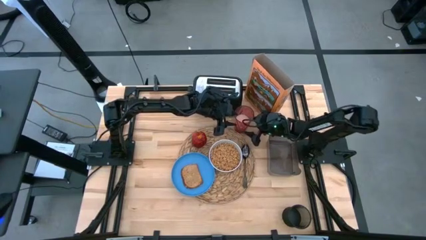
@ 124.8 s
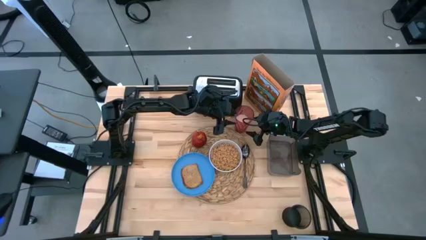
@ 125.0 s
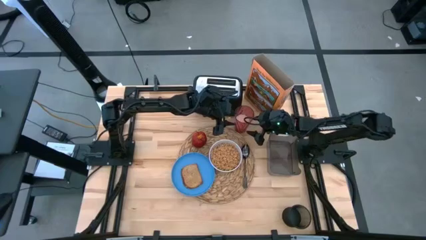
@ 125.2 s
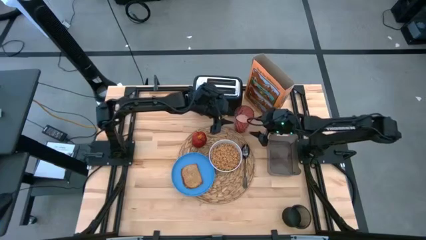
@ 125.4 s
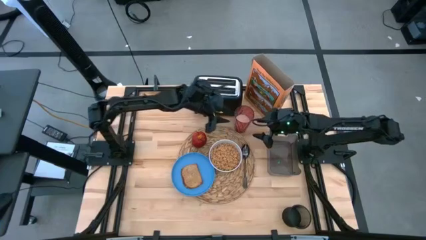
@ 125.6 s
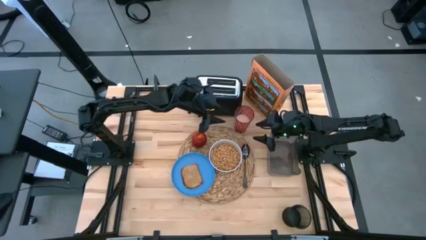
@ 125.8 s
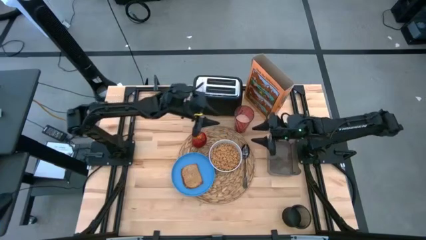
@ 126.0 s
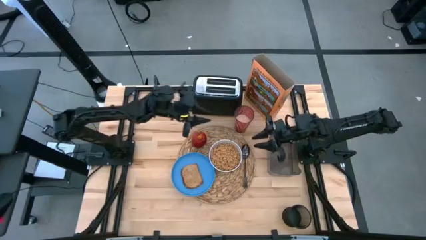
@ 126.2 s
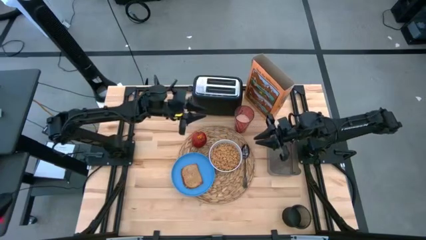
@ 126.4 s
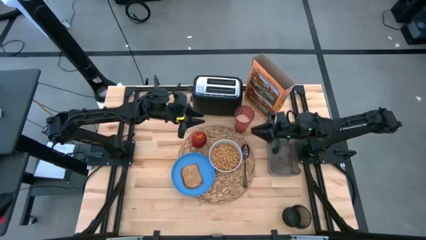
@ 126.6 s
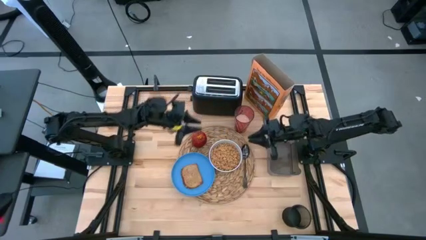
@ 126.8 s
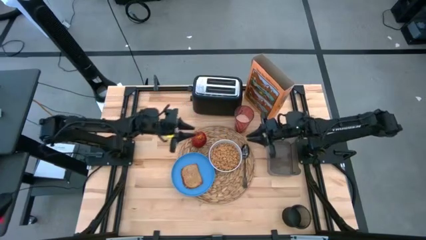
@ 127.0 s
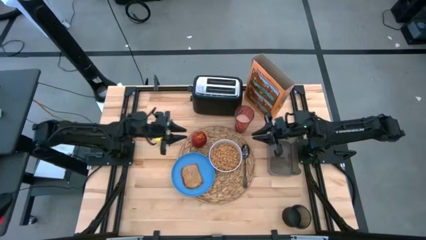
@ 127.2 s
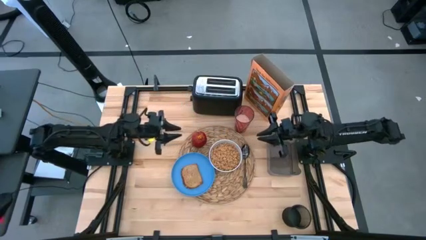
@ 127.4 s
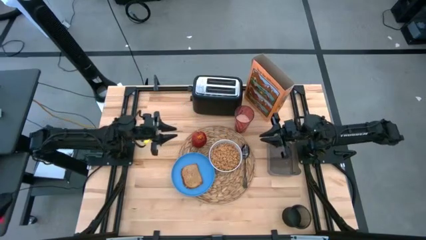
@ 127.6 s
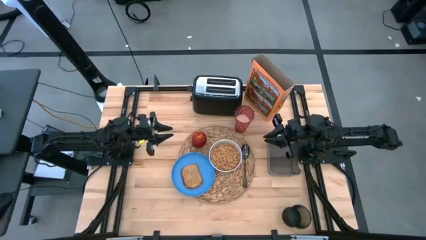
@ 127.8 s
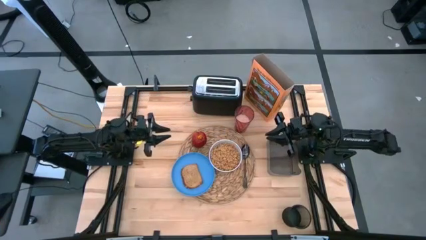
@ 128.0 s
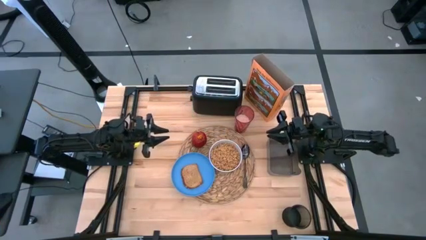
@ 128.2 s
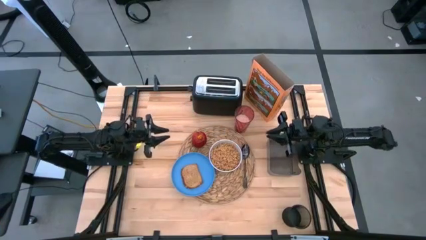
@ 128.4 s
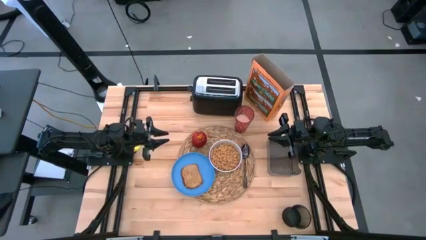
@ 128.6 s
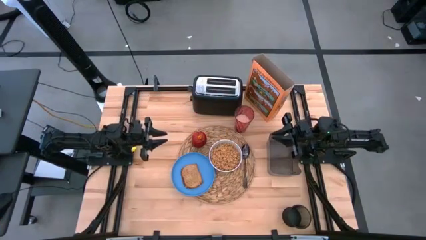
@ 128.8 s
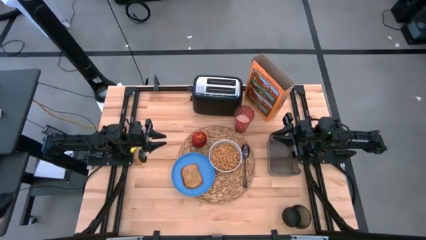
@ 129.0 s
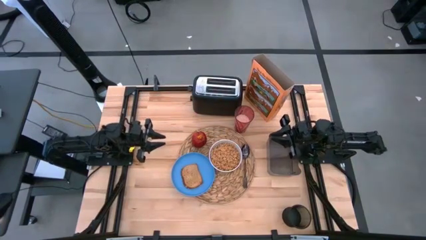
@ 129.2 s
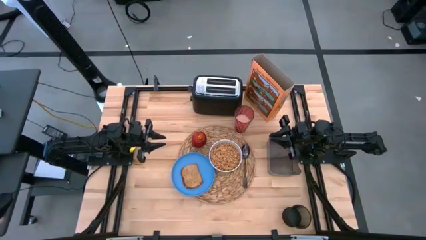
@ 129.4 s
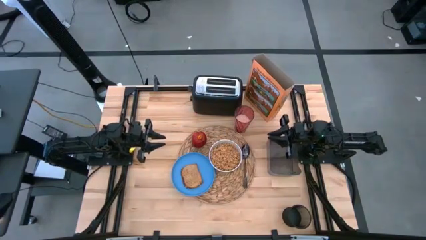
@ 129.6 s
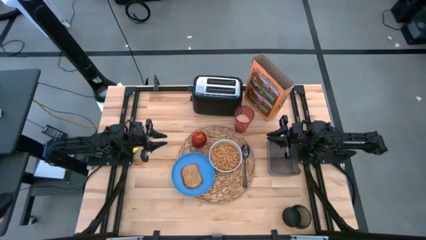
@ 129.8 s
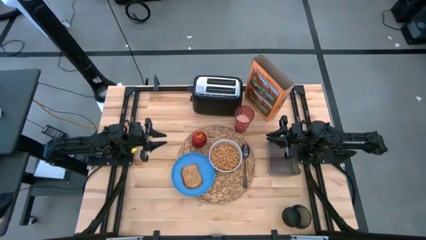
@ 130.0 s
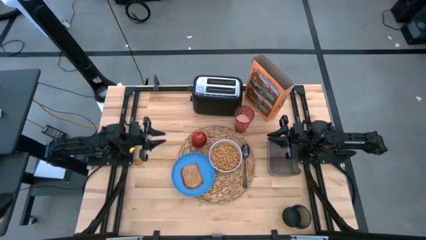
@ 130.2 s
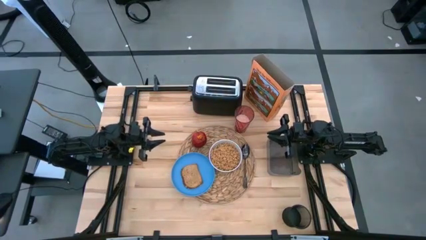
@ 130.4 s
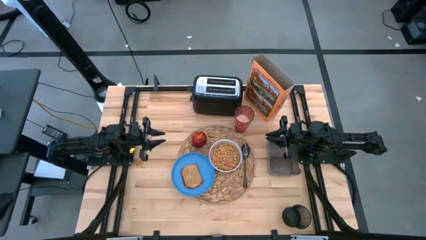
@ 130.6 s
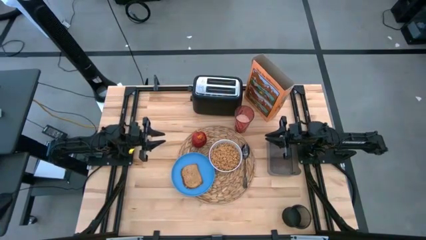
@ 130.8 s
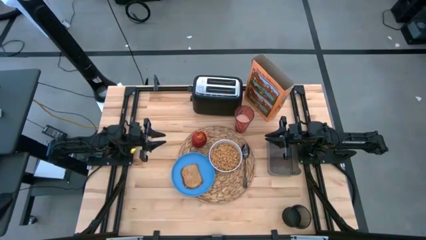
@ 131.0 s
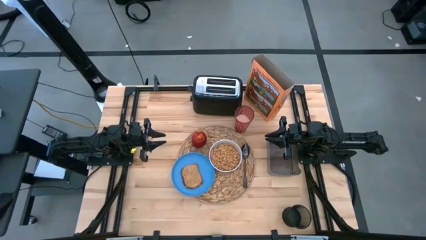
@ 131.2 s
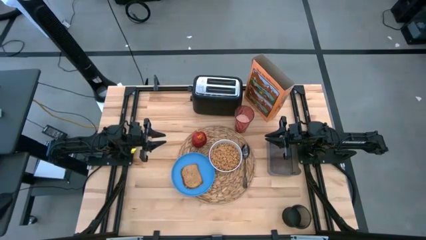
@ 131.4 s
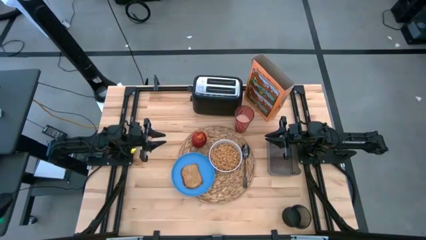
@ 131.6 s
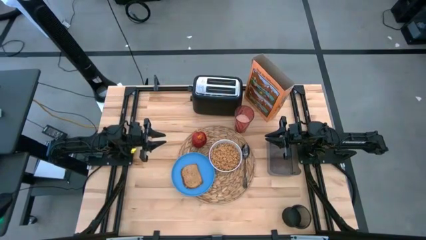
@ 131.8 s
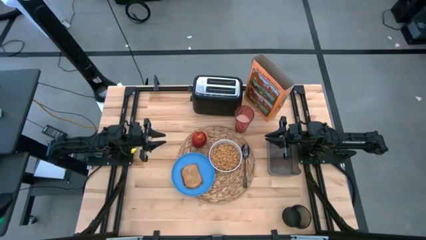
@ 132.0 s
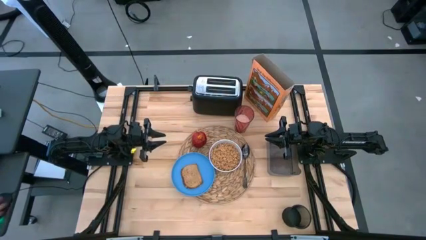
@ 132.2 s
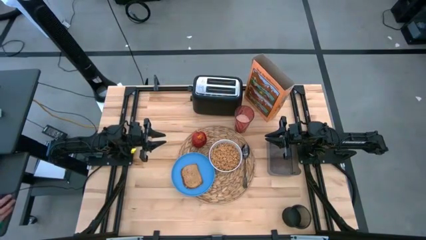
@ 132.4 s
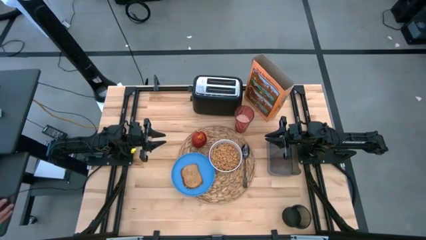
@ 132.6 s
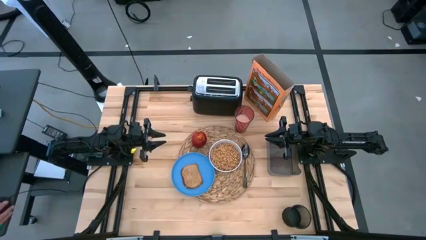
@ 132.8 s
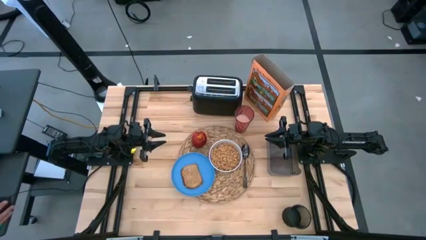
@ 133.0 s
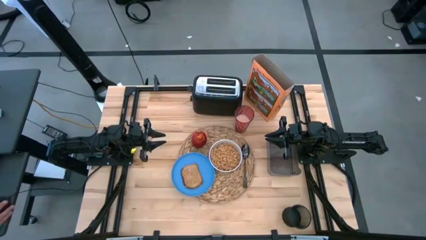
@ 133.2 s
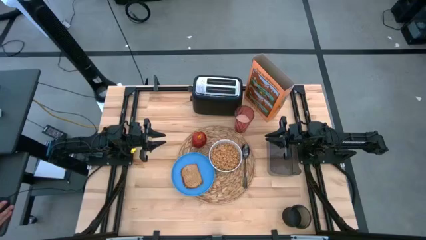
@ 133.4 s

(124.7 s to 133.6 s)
Task: Arrange a breakfast setting
Return to Home Position

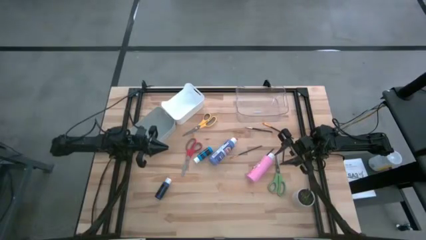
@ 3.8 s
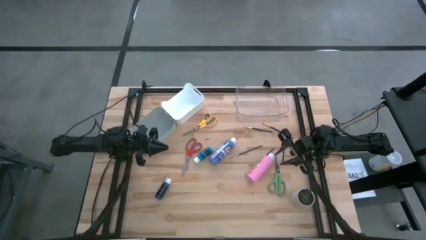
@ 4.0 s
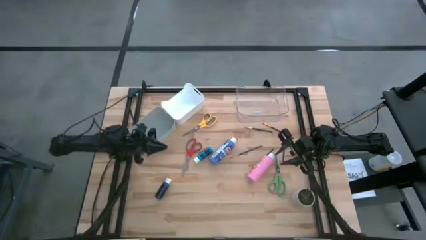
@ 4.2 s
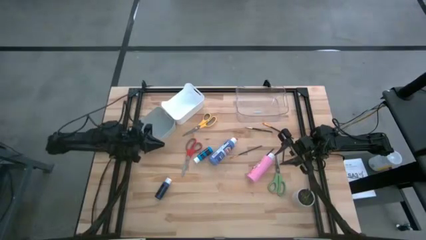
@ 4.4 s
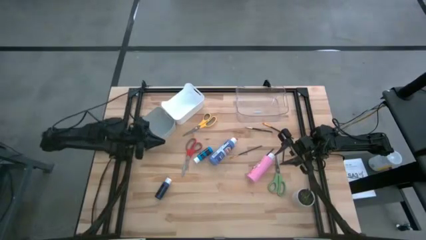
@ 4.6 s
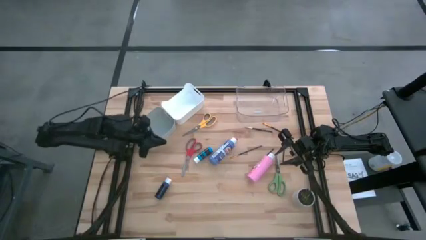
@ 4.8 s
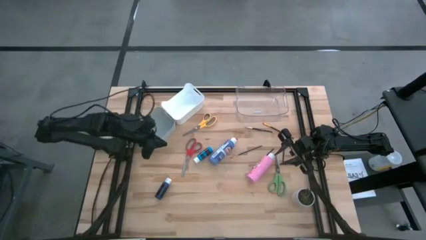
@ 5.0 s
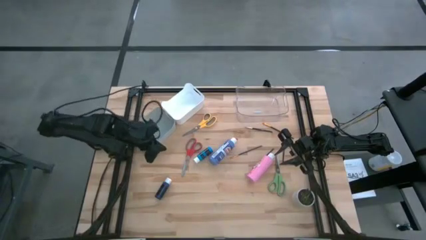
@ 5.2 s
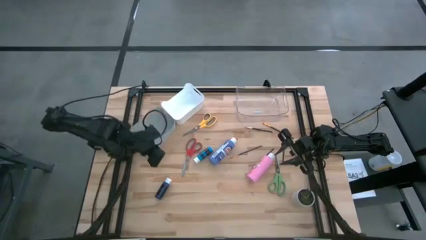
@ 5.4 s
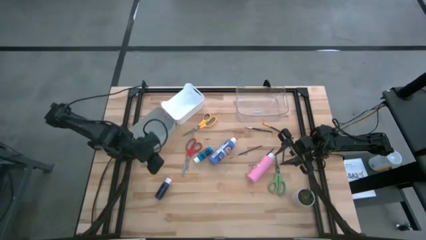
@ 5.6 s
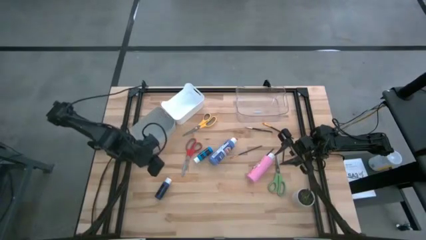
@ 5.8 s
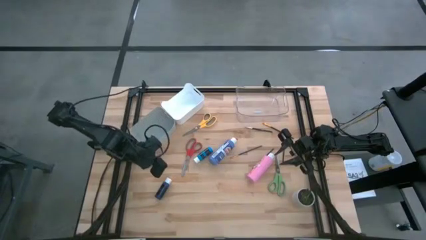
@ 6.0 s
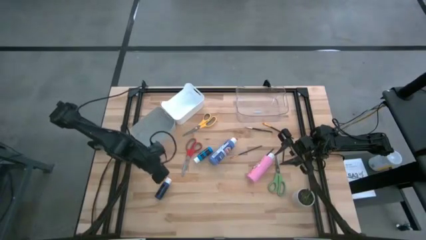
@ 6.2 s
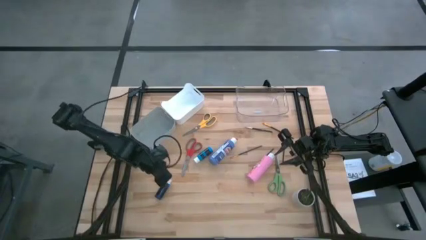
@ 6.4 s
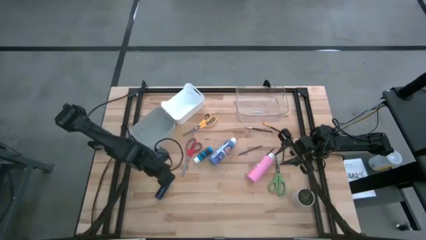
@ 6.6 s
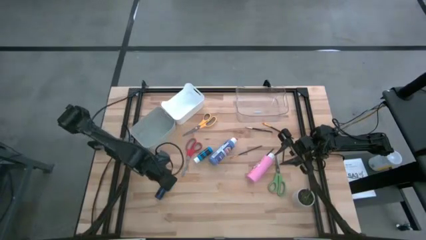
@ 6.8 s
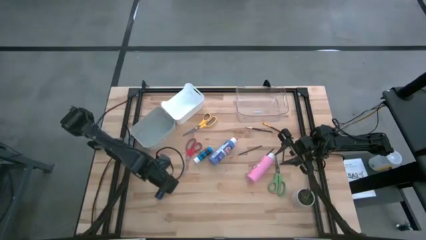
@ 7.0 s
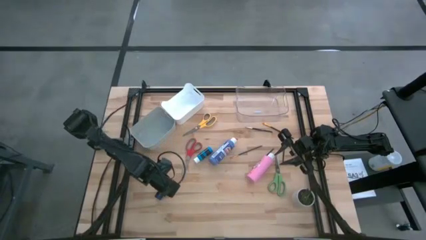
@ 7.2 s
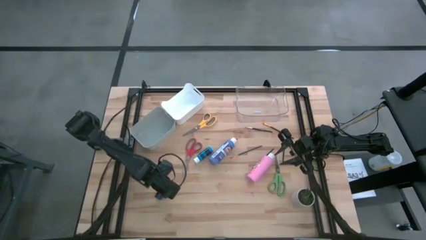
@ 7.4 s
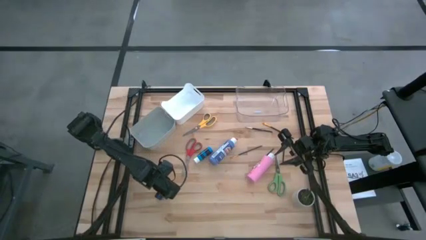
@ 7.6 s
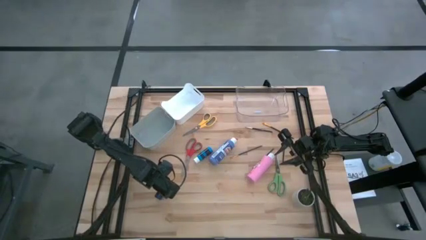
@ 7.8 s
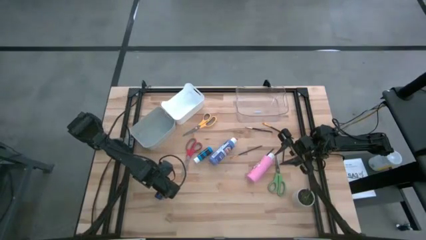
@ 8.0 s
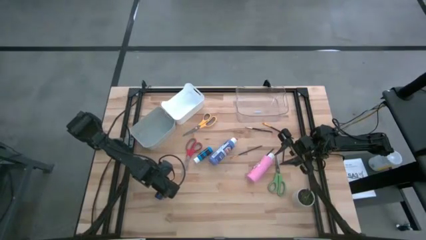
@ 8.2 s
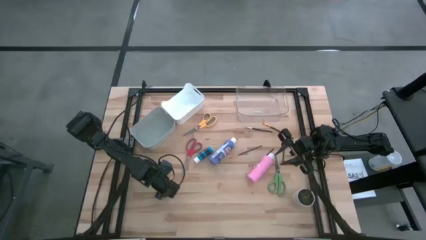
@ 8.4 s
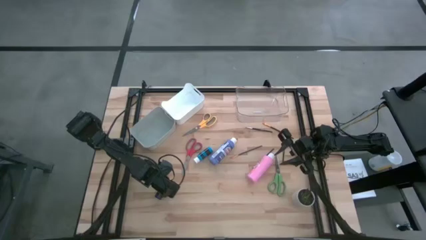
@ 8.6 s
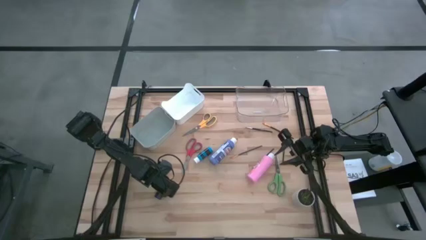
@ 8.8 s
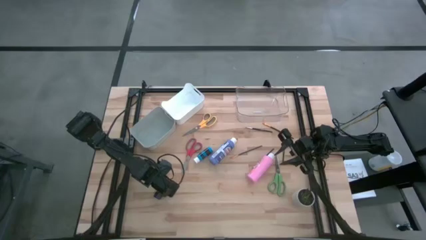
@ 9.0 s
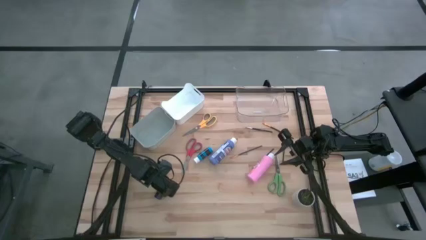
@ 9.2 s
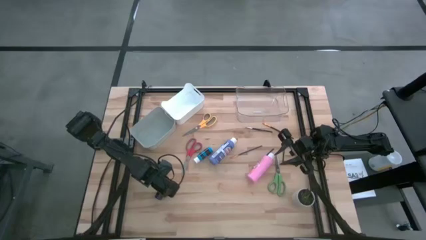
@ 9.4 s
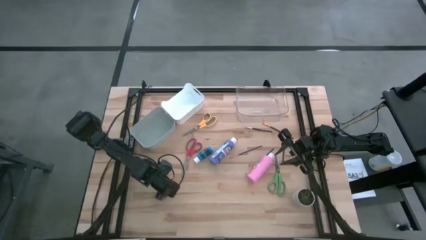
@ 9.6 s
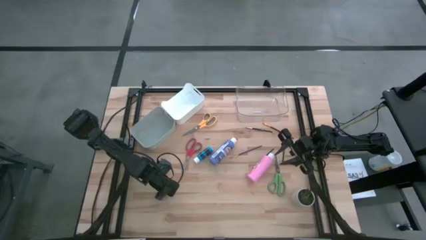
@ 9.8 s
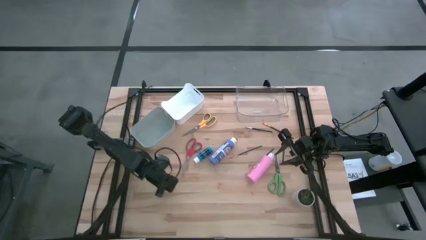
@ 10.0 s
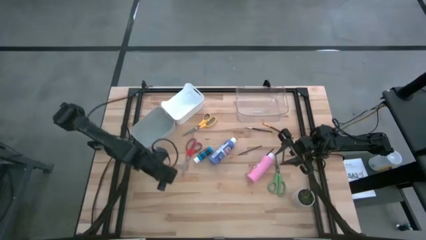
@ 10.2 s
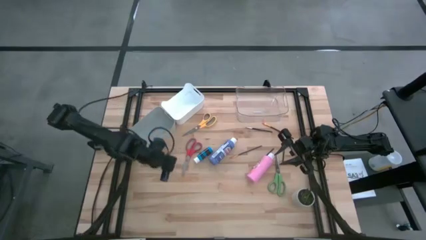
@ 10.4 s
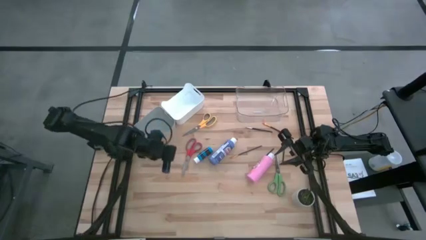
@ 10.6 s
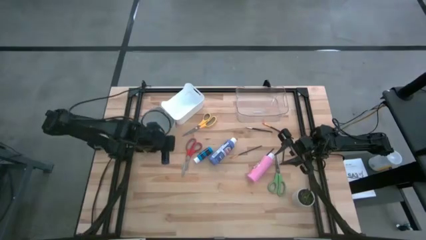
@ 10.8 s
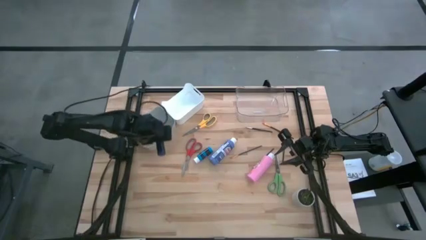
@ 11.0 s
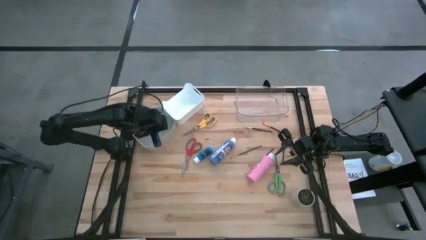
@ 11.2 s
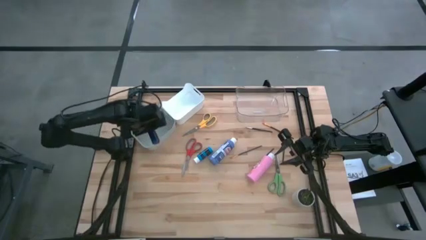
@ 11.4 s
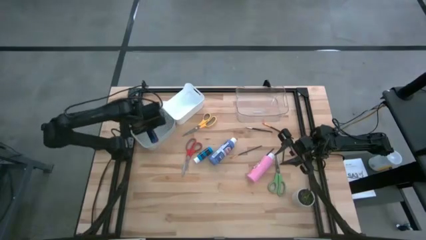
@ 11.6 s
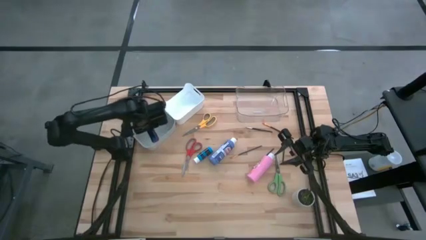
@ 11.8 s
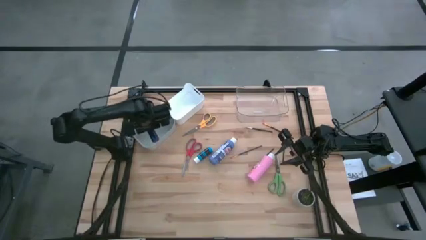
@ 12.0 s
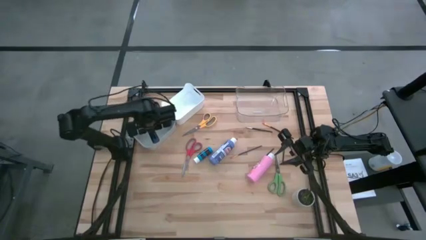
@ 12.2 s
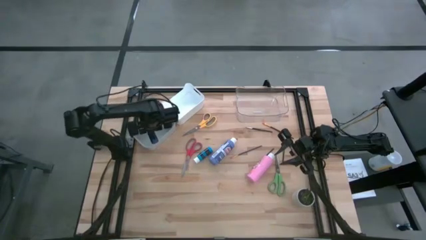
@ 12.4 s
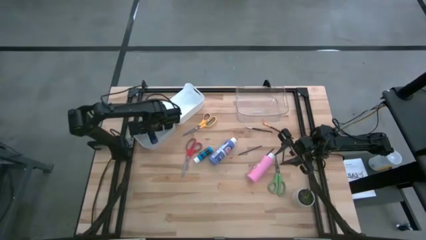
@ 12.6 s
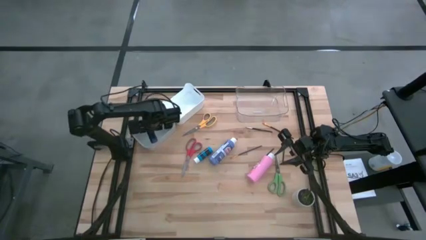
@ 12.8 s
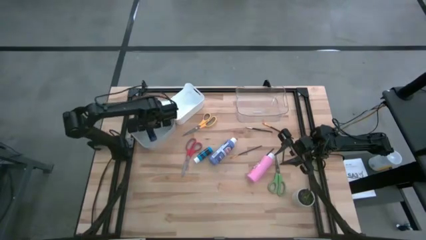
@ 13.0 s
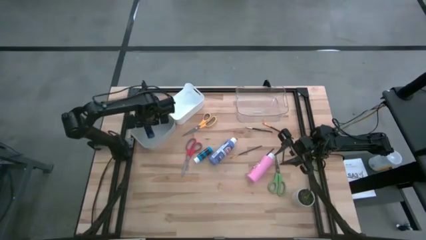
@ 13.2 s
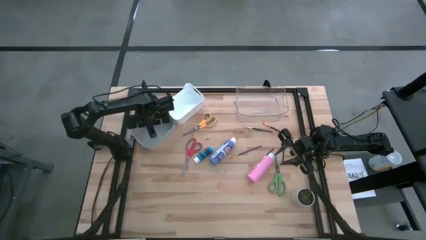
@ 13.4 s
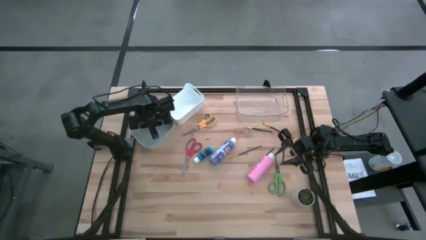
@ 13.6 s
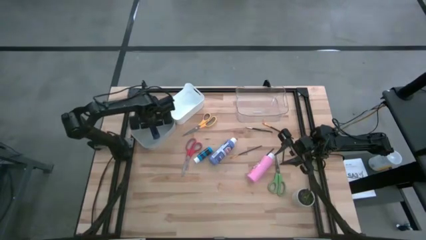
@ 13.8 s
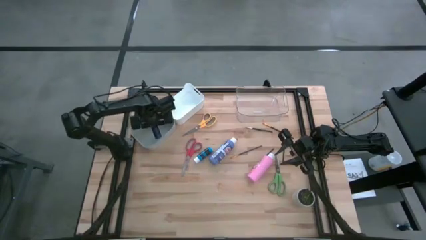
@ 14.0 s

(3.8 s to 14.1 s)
Task: Pick & Place Paint Supplies
Put the dark blue paint bottle into the gray bin
